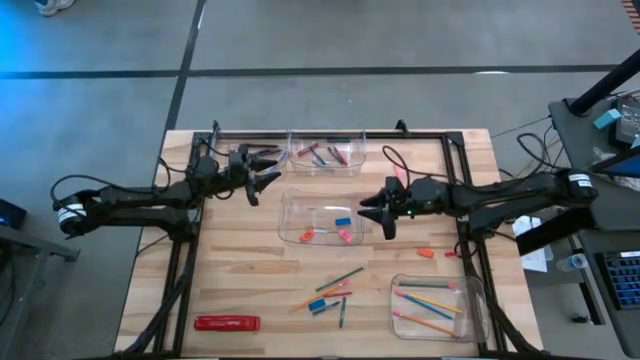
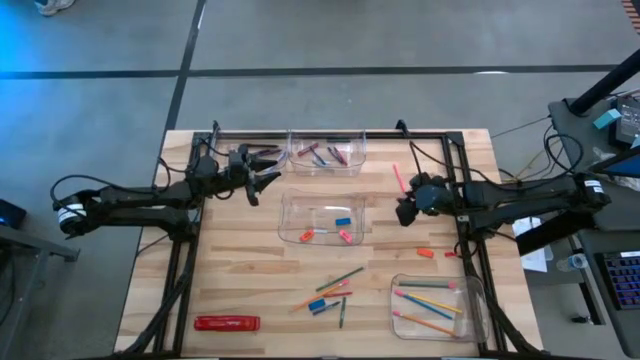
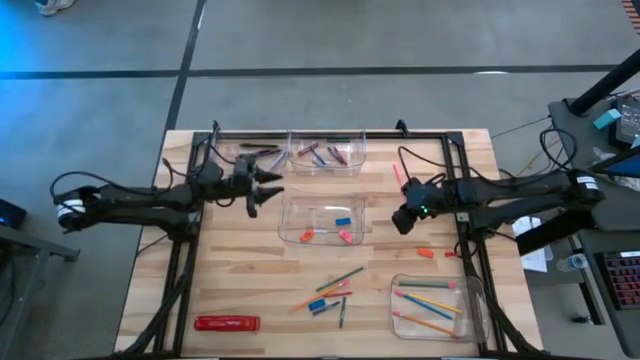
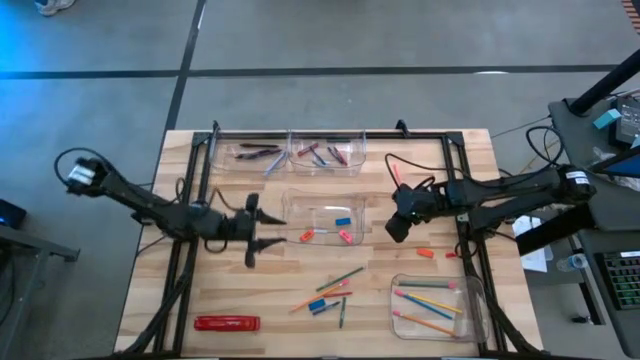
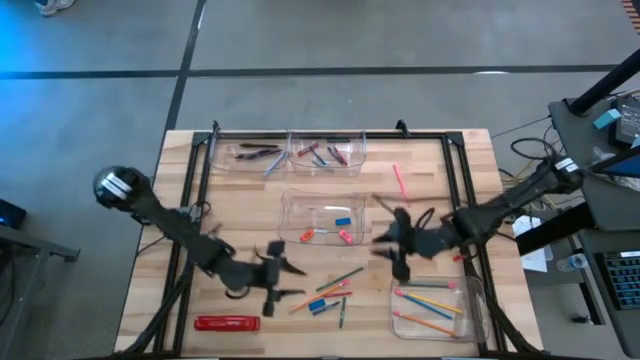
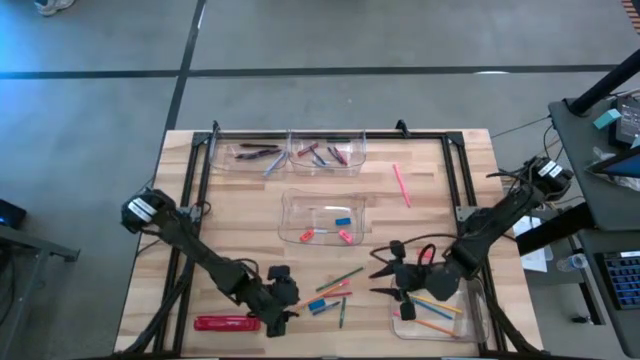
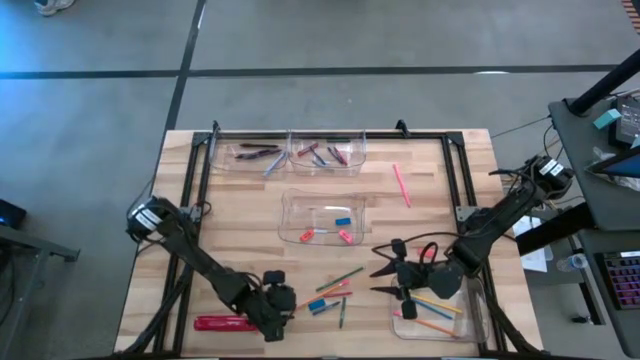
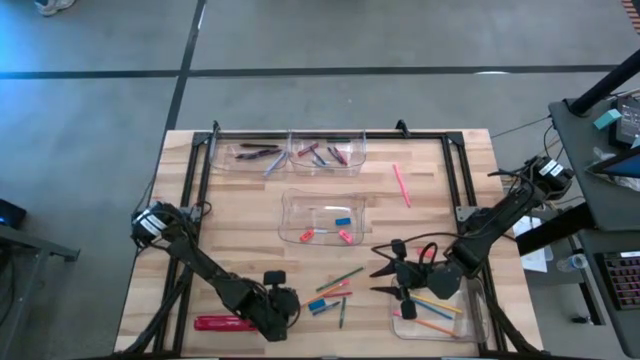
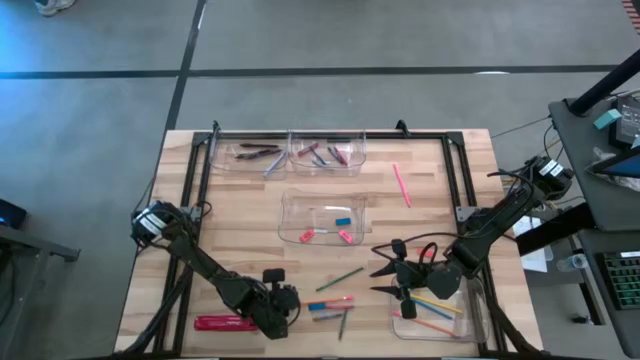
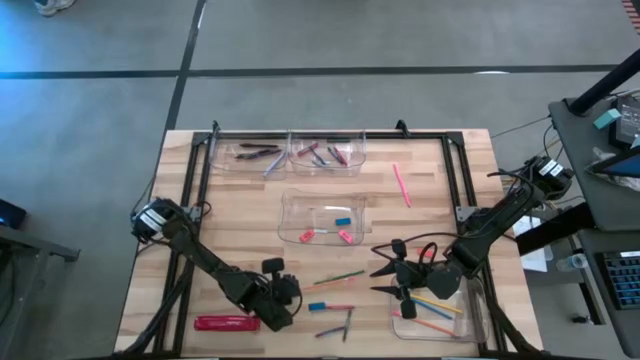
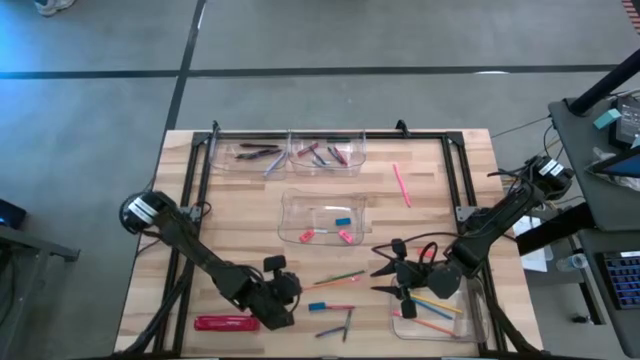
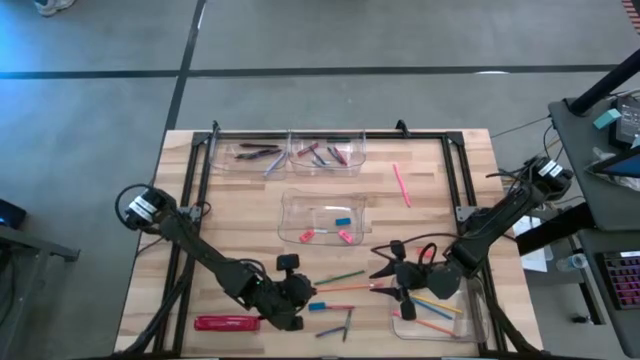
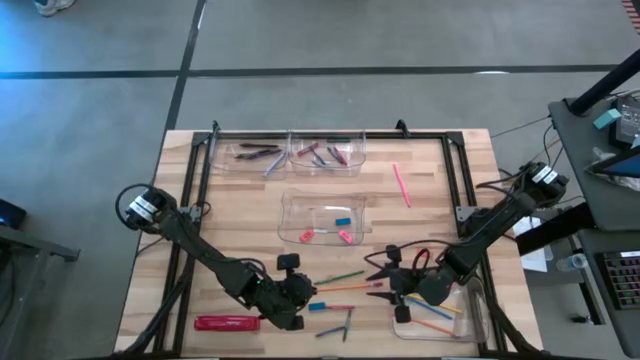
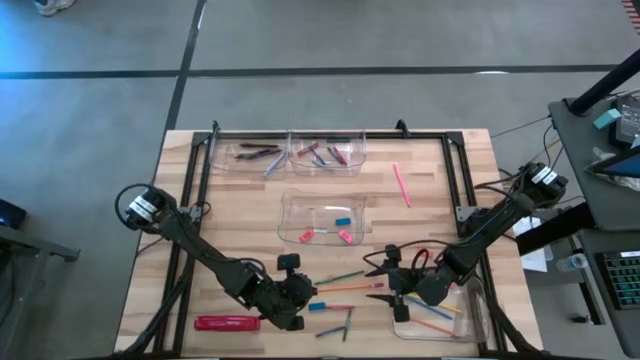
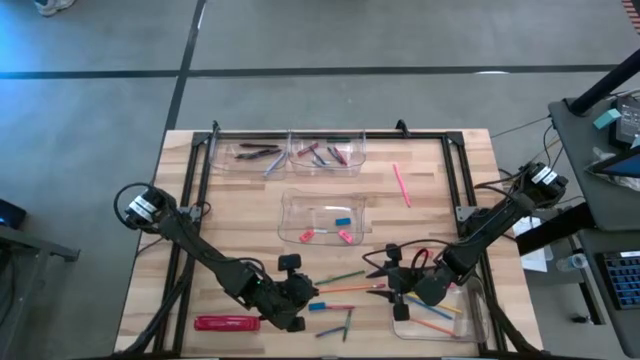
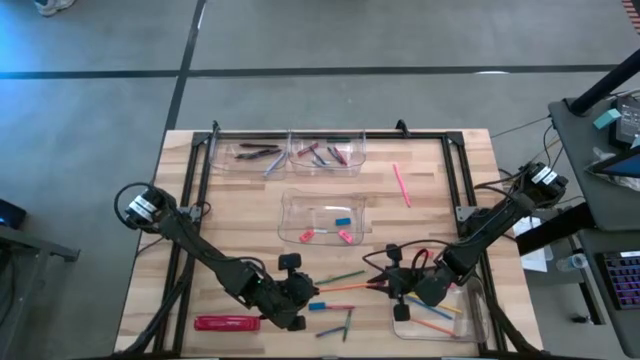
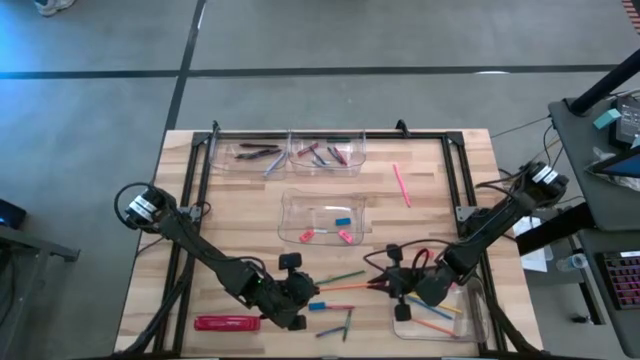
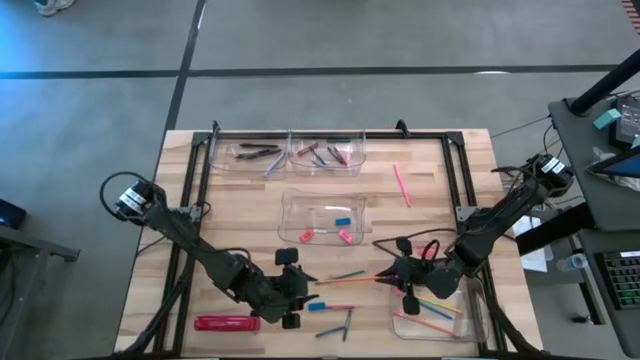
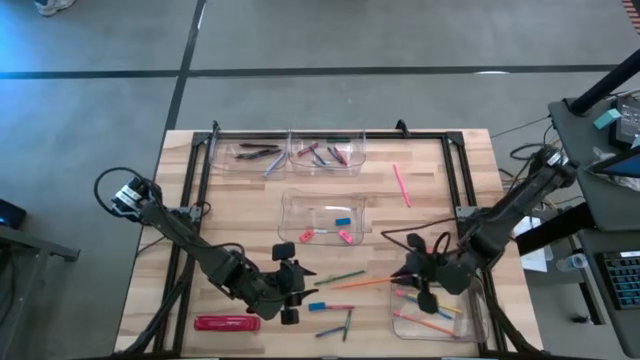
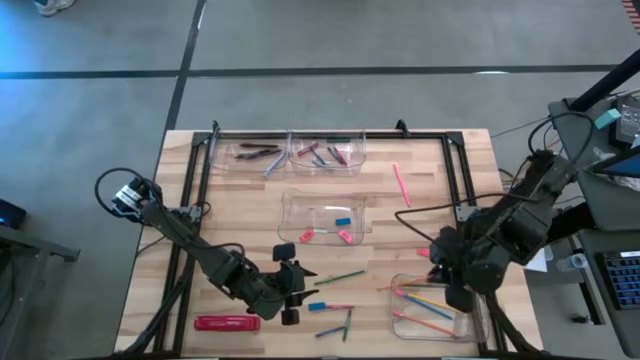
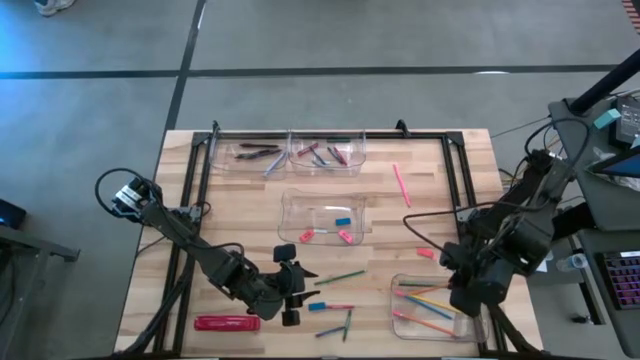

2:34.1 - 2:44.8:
Task: Sort crayons/erasers/pens/pencils in bins
Put the yellow pencil into the bottom transparent bin

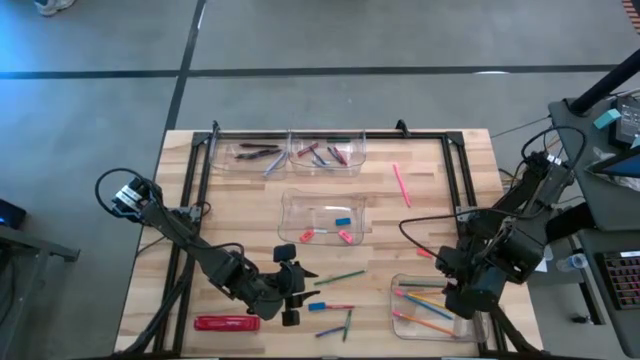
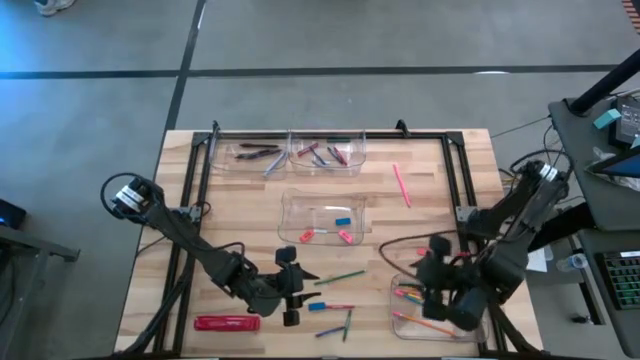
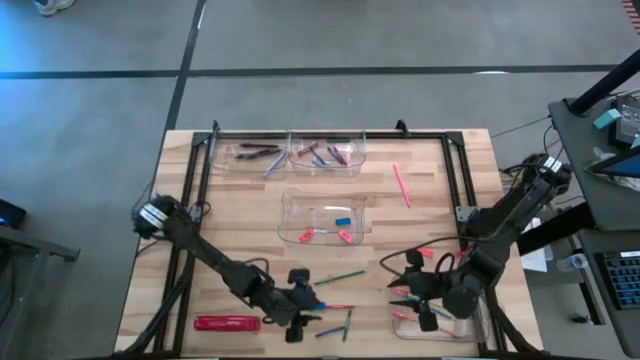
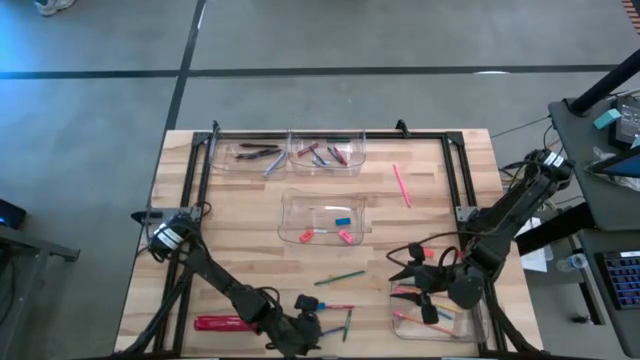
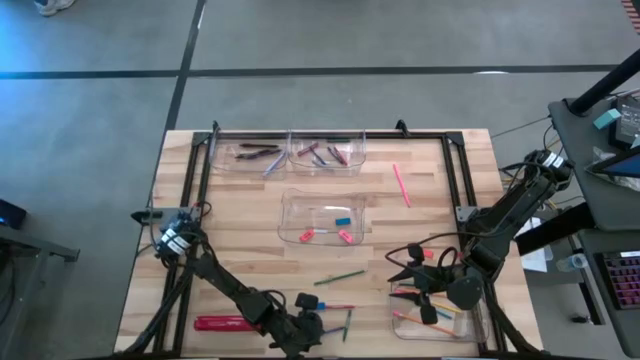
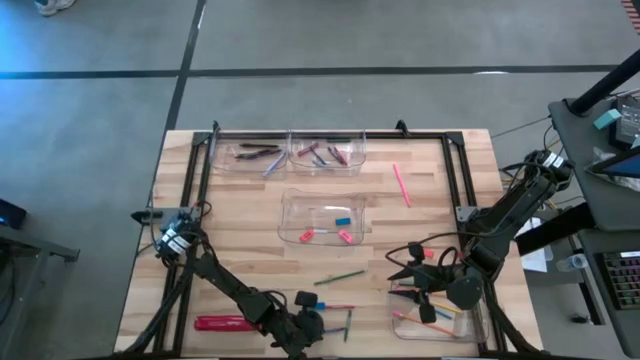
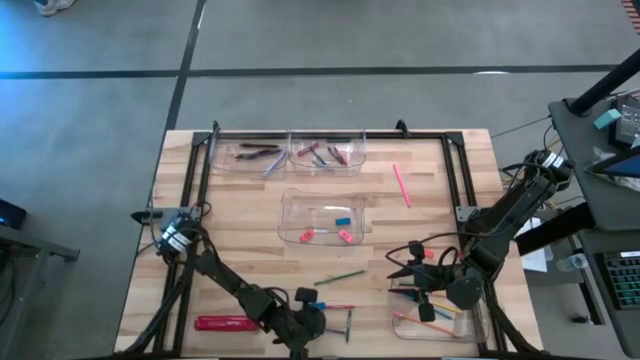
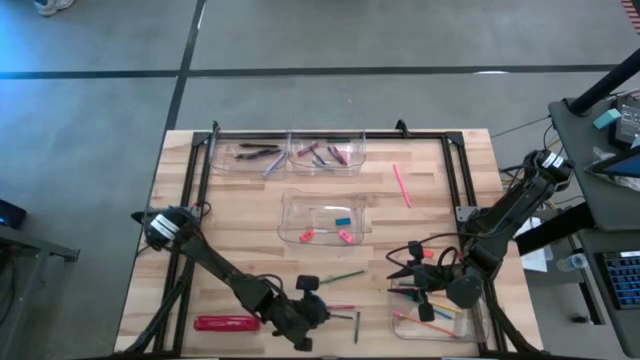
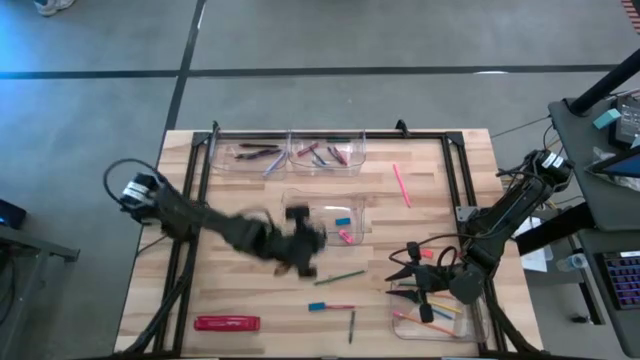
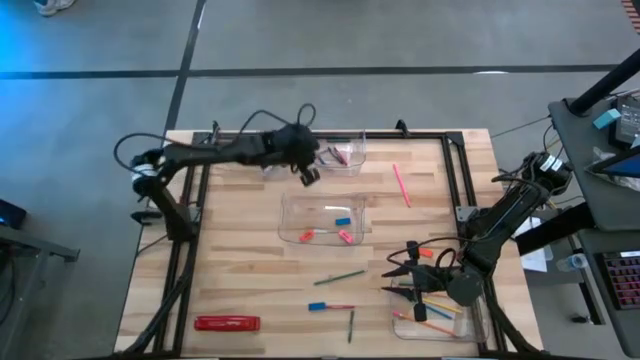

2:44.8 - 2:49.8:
Put the blue crayon into the top right transparent bin

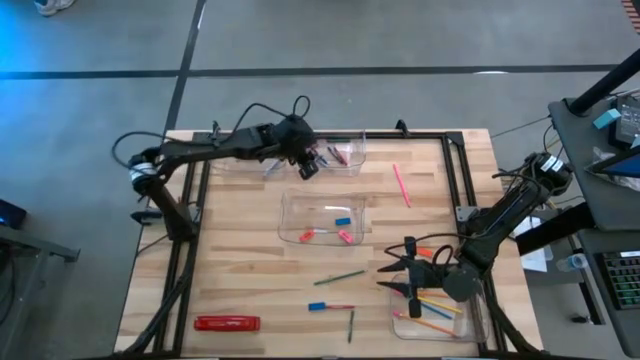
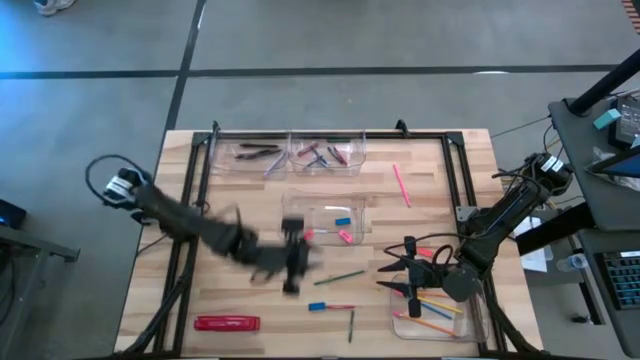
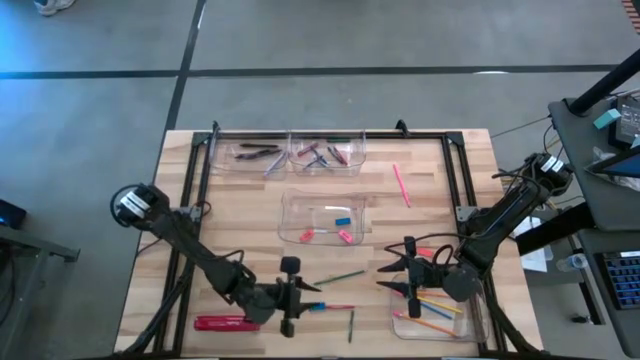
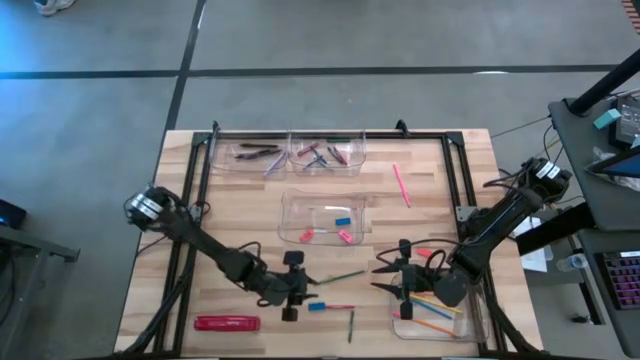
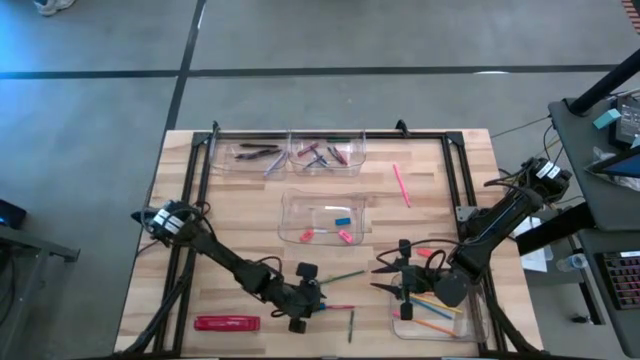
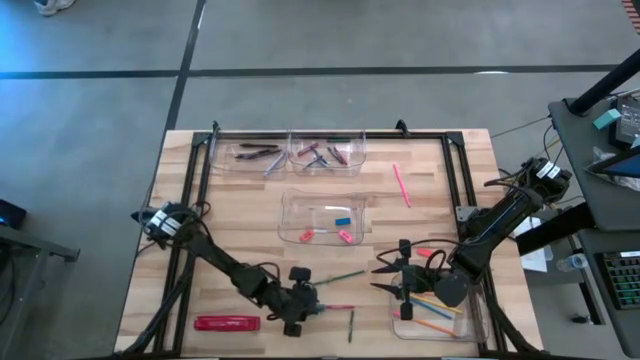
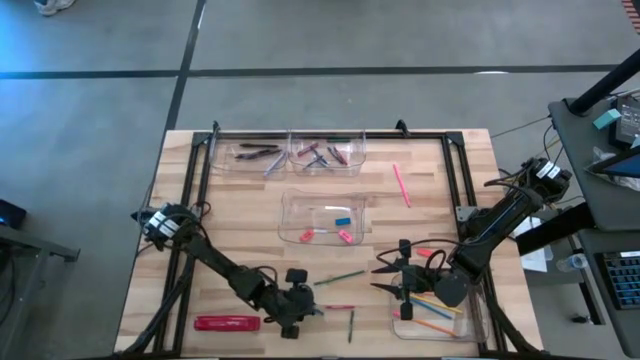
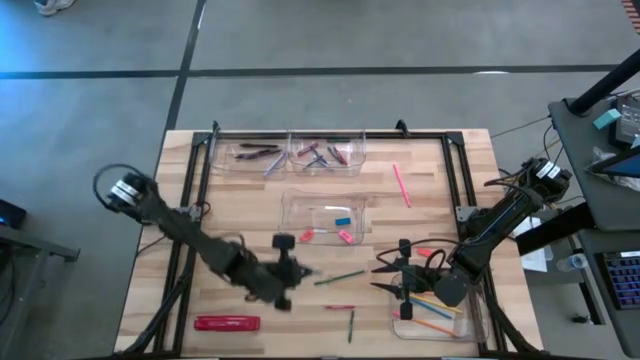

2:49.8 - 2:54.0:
Put the blue eraser into the middle transparent bin

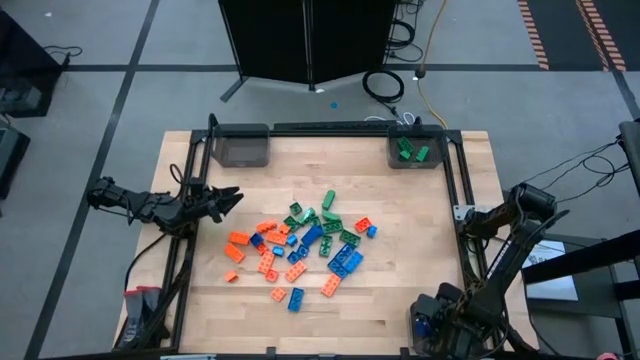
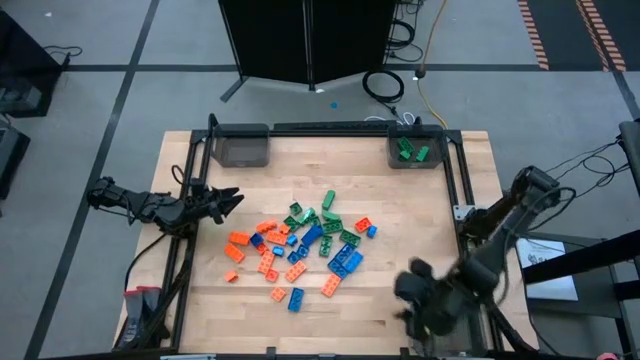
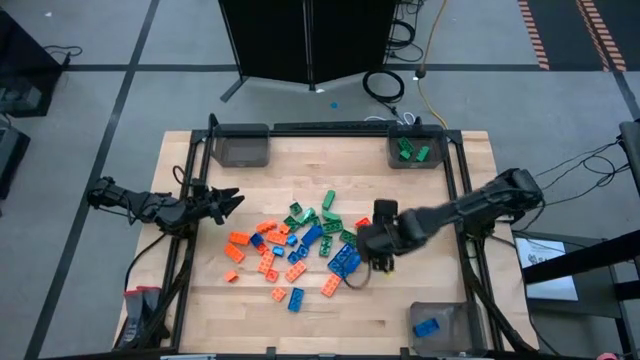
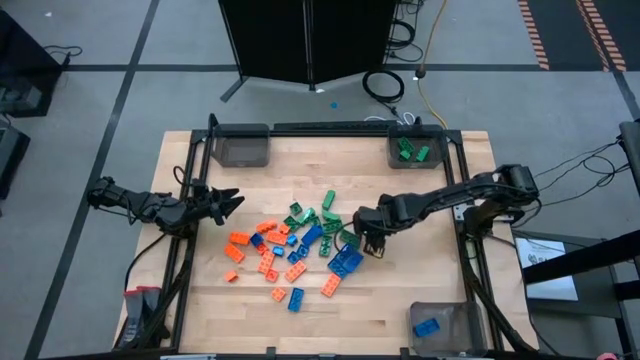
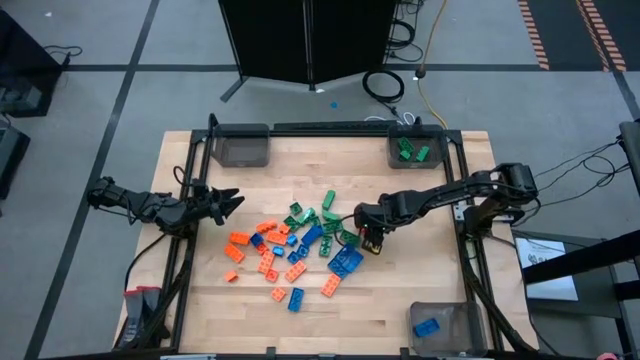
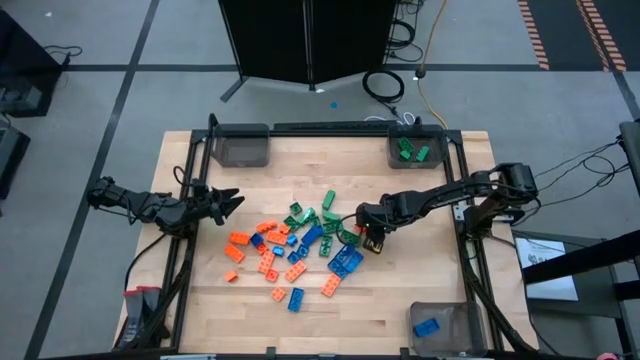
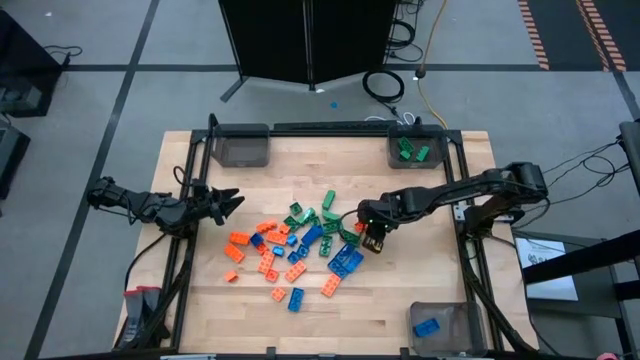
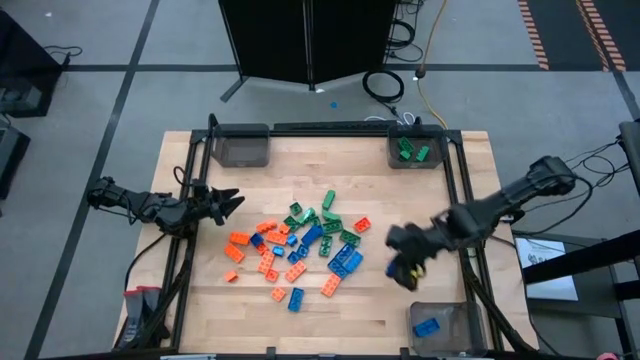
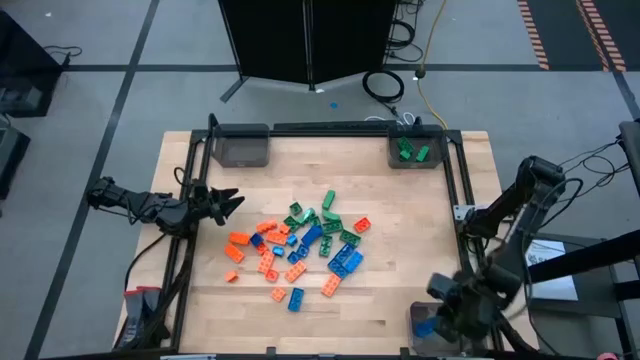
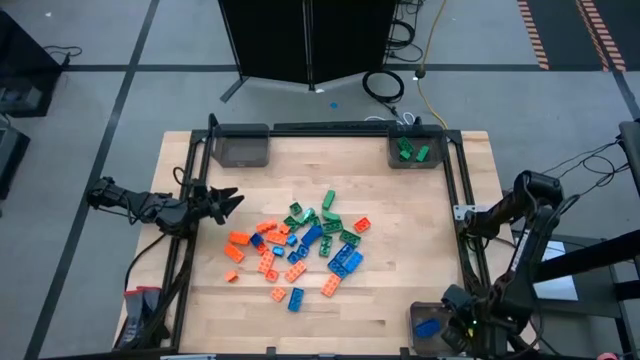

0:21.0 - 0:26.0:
Task: Sort blocks
Put the blue game piece into the bottom black bin
